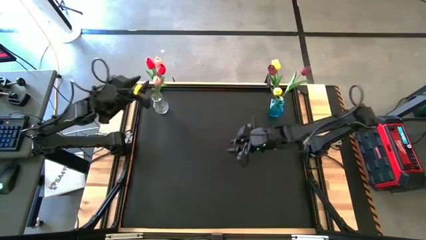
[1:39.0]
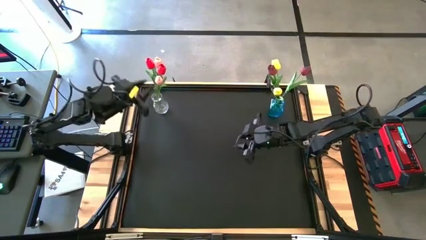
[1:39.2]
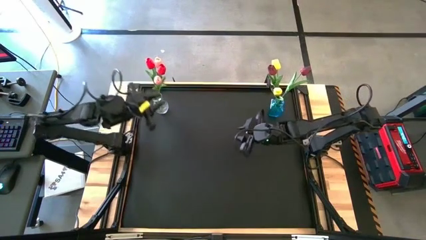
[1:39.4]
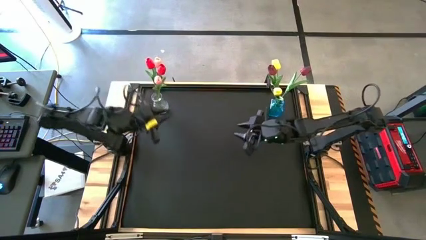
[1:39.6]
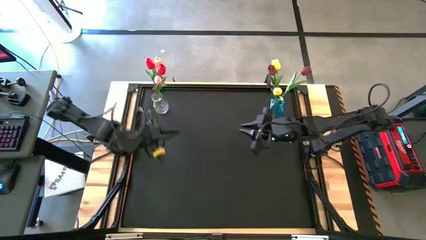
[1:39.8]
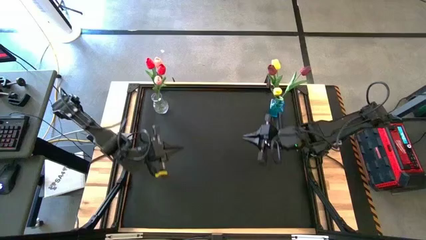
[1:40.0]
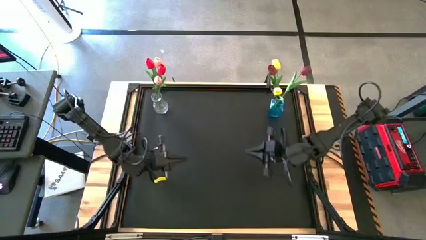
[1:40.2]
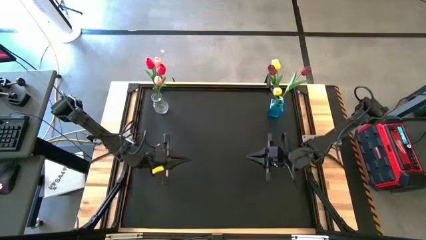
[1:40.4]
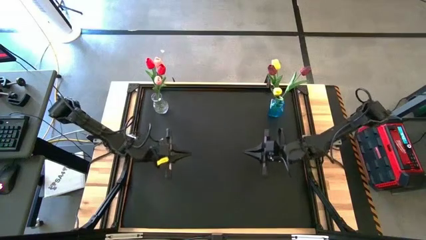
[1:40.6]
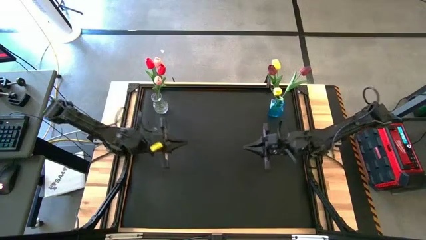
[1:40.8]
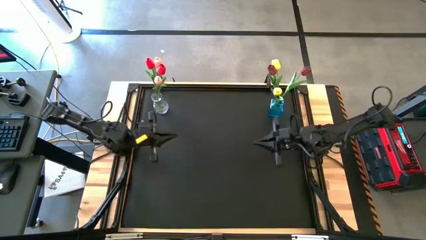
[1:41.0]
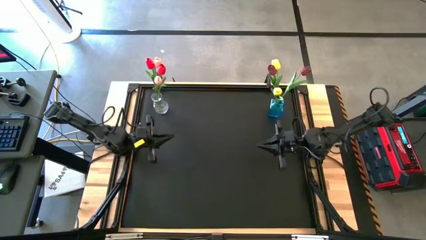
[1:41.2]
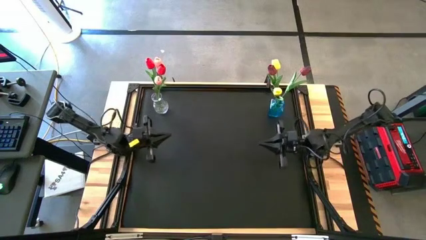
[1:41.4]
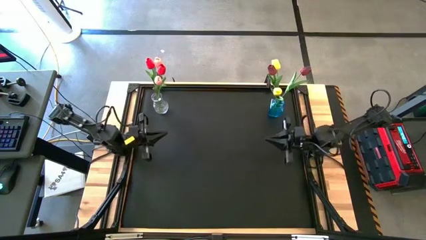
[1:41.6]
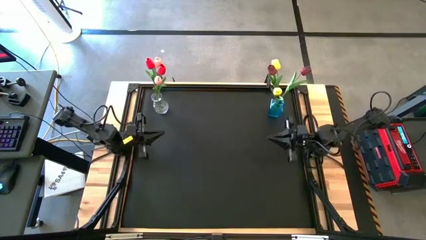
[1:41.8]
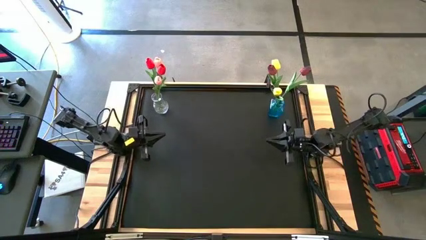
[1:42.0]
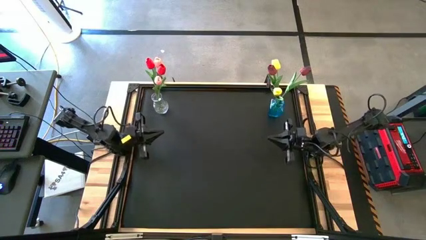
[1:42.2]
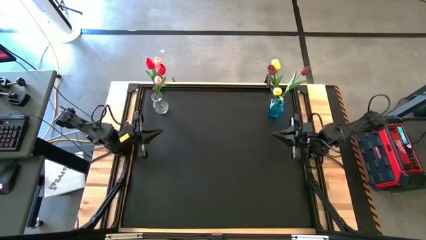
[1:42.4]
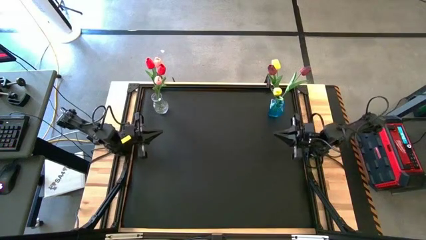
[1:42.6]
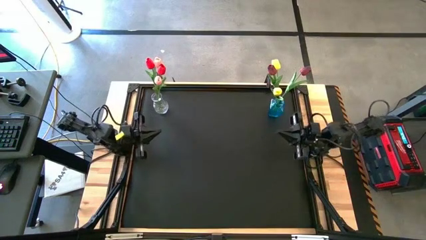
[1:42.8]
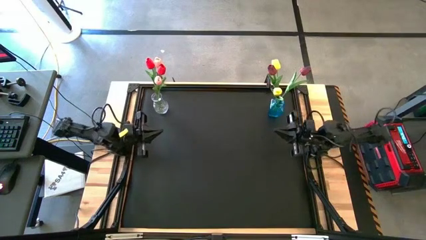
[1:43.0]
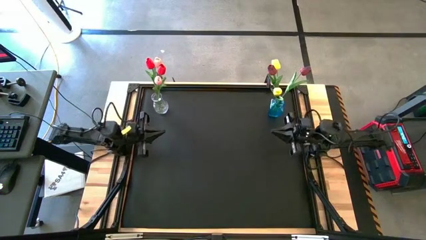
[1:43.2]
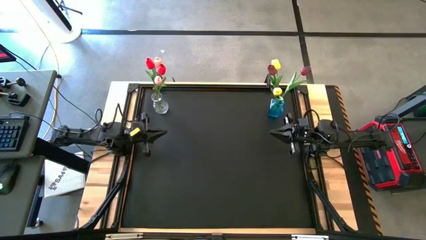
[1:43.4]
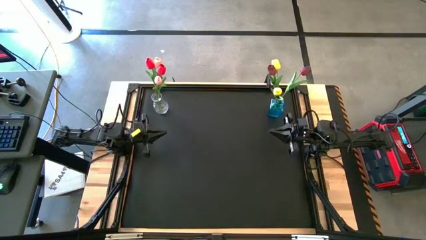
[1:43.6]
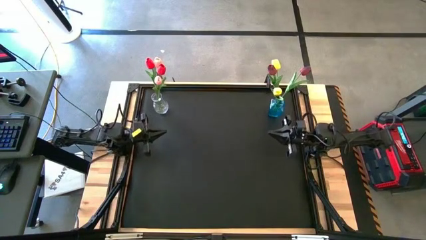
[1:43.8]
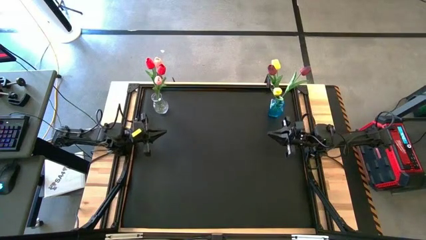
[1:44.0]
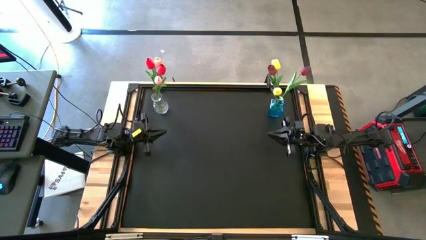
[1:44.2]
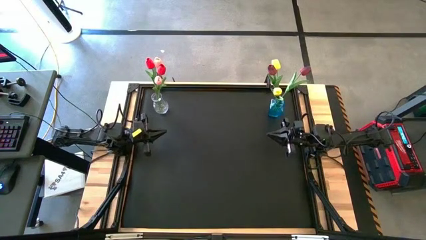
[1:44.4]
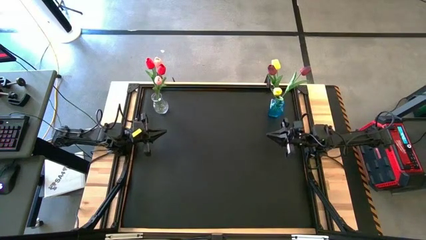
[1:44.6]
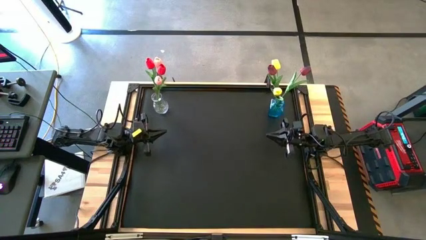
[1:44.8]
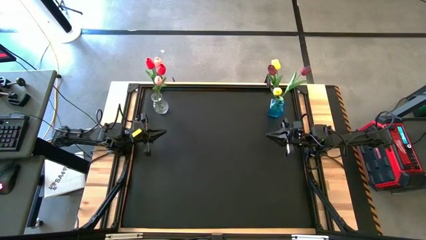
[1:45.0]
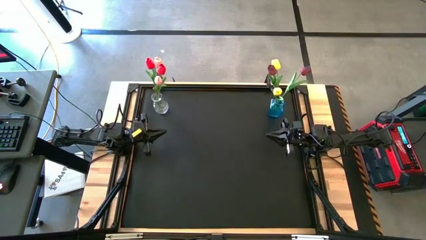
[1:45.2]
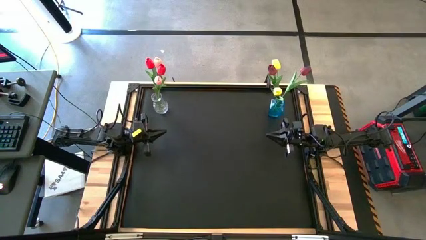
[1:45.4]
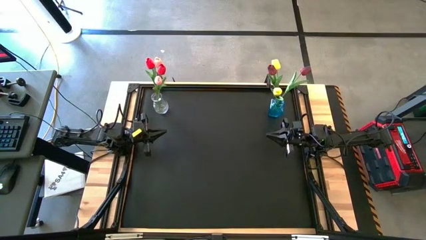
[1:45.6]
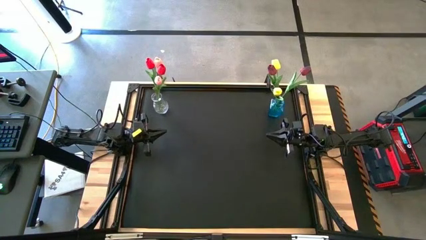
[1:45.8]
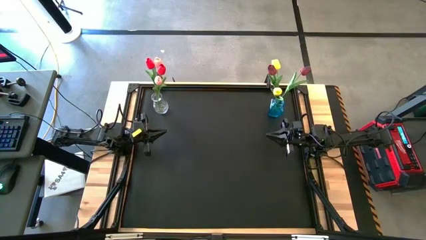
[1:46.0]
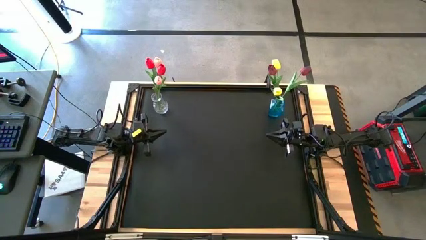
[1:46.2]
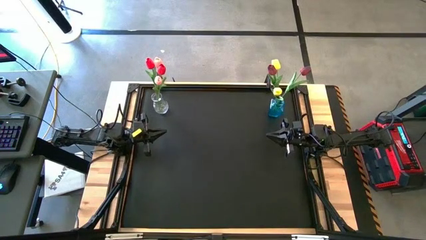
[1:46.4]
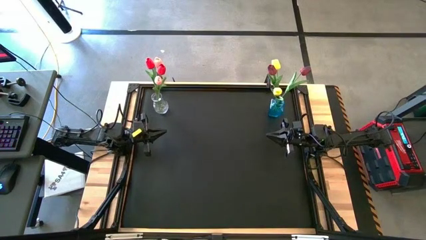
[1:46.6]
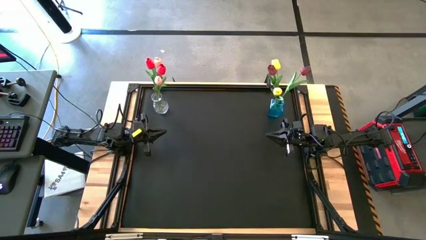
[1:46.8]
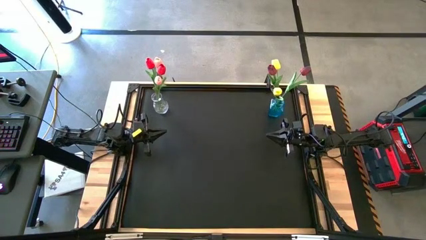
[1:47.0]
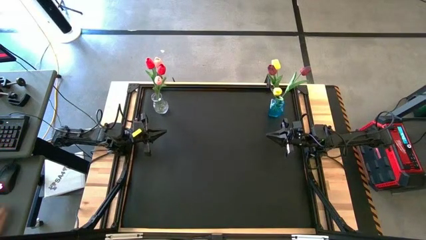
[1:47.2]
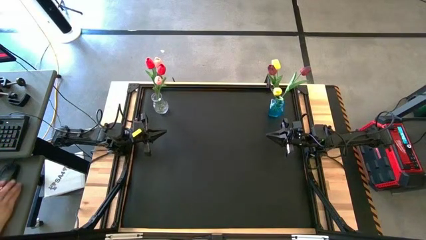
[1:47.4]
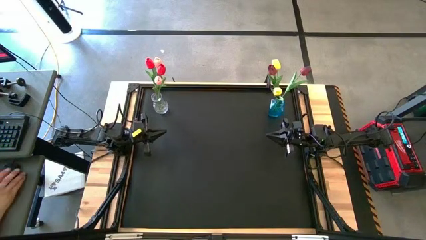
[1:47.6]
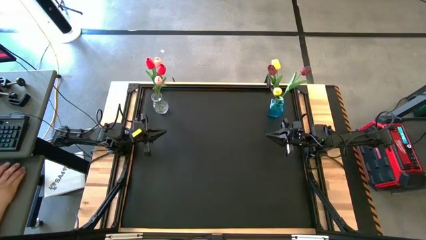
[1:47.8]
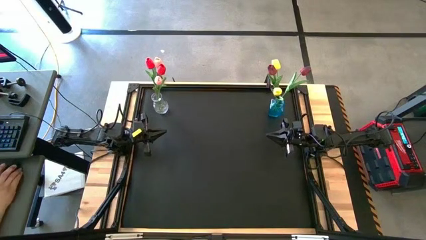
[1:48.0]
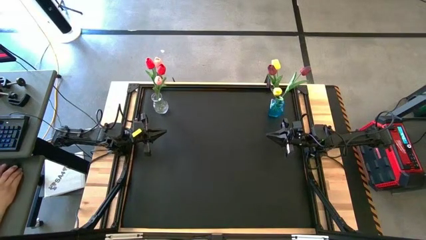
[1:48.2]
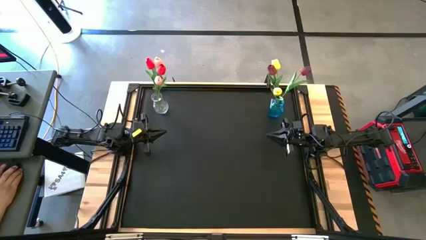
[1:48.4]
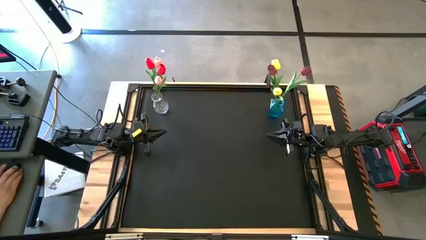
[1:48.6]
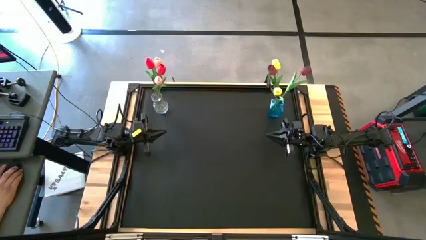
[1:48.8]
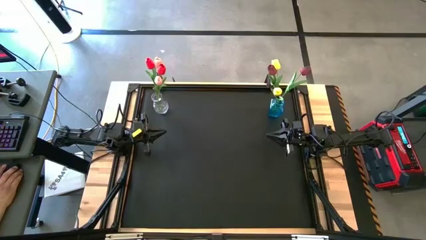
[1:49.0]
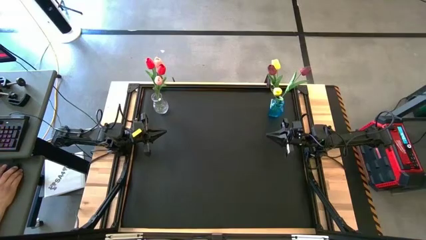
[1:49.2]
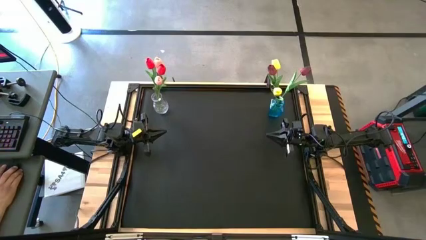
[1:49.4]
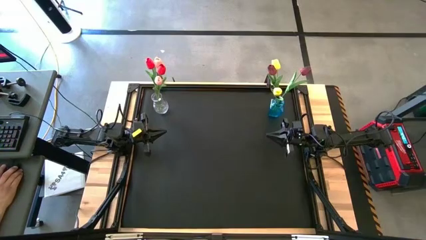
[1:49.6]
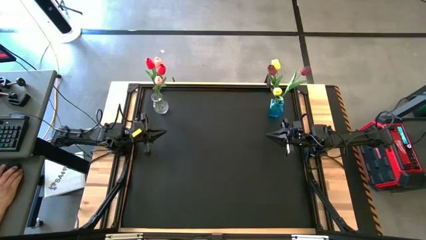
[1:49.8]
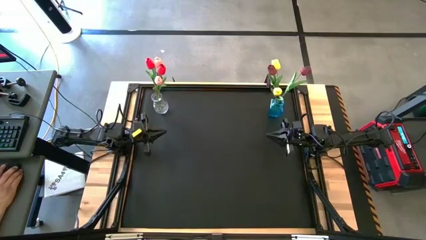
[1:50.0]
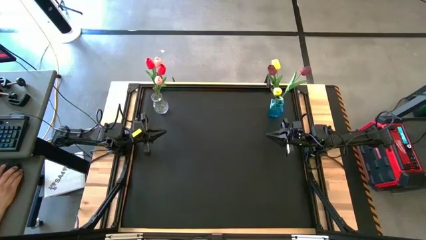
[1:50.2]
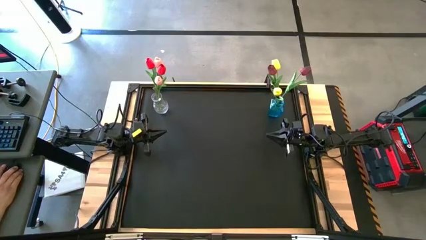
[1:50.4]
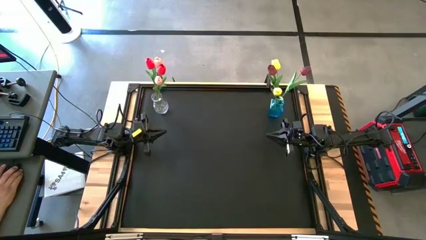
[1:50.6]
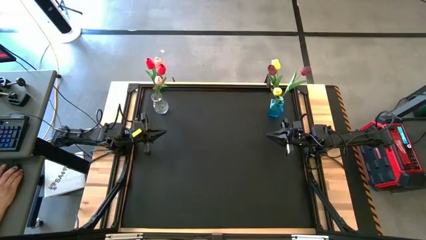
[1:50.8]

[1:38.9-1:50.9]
Task: Sort flowers into vase by color
Return to Home Position

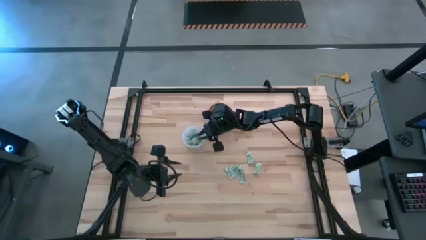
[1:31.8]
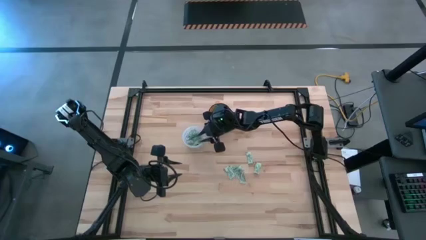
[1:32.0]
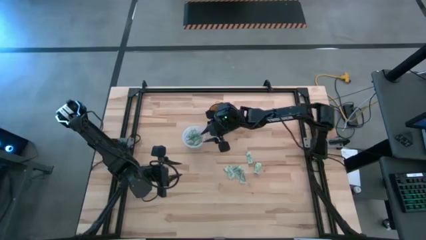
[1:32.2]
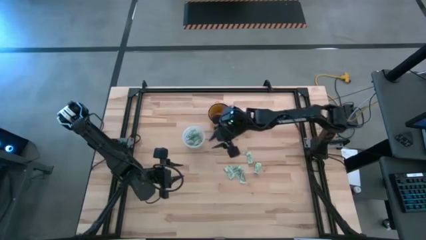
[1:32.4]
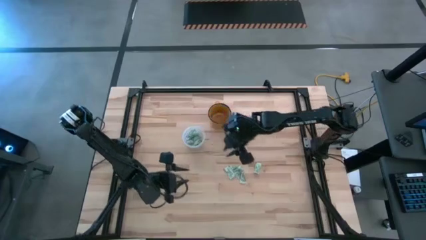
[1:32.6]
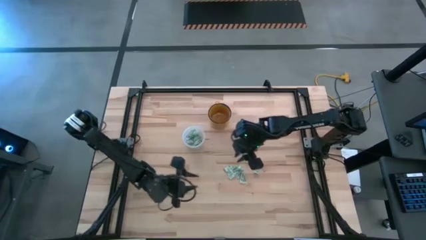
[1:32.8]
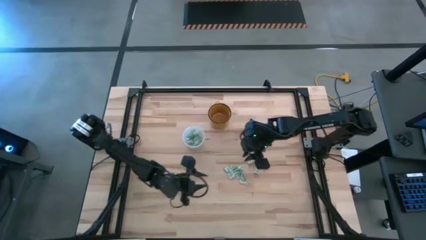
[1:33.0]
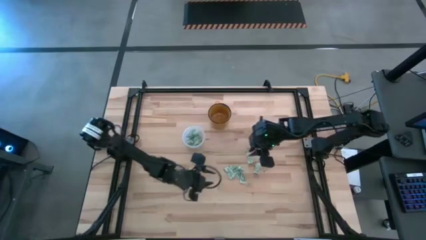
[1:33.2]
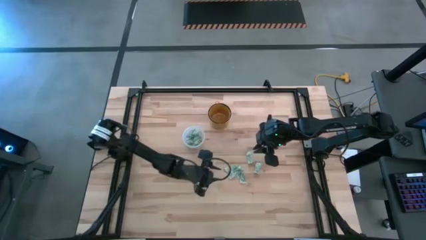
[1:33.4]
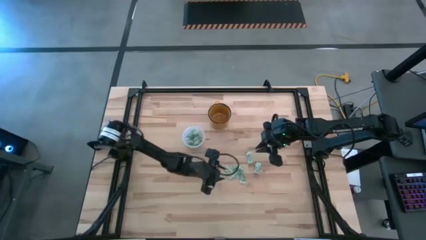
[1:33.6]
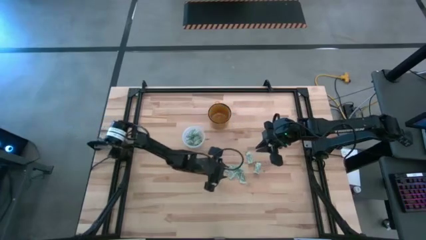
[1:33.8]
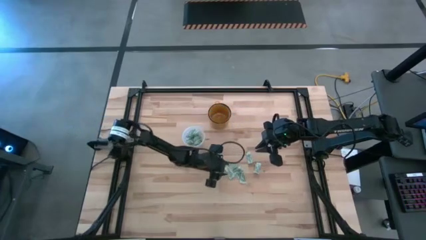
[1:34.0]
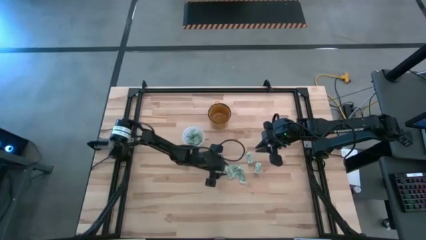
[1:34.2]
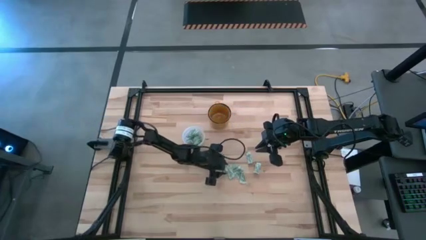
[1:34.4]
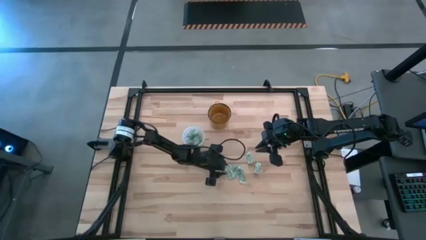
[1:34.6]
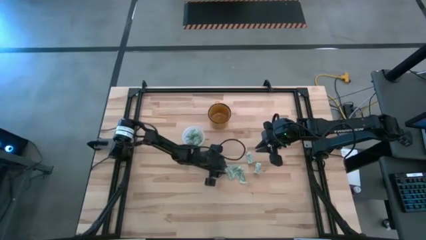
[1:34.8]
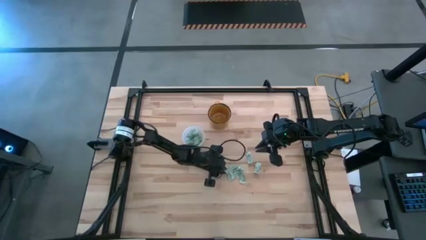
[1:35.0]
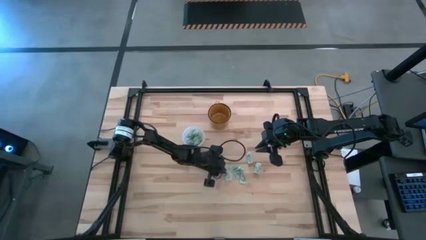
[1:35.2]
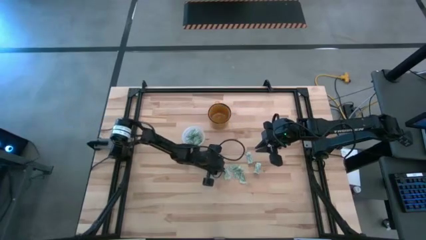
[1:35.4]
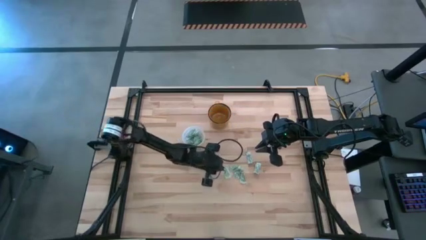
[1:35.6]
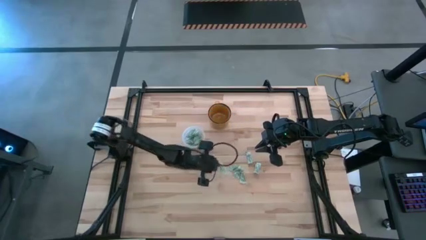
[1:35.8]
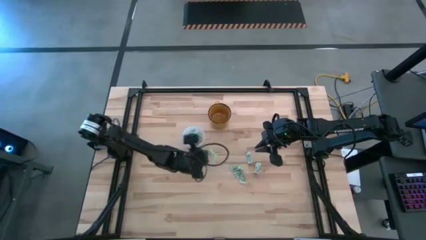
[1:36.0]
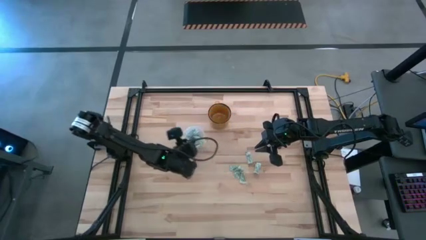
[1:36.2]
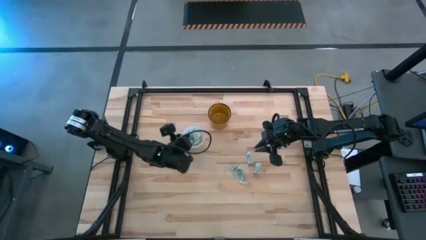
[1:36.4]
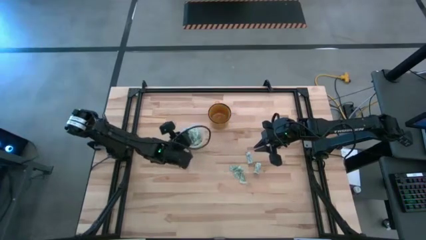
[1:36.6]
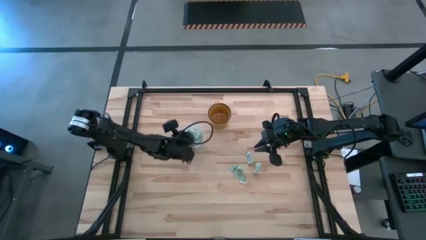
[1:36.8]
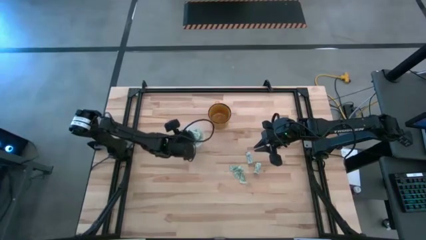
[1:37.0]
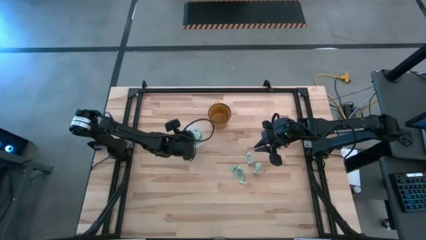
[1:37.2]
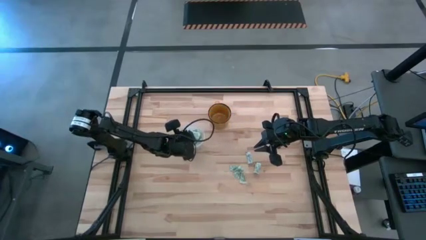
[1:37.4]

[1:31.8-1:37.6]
Task: Pick and place Stevia / Truvia into bins
Put the stevia packet into the transparent bin
